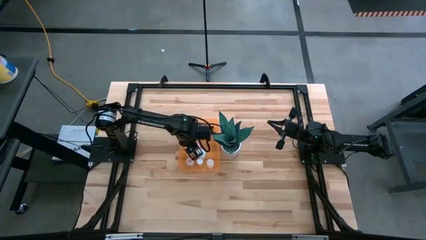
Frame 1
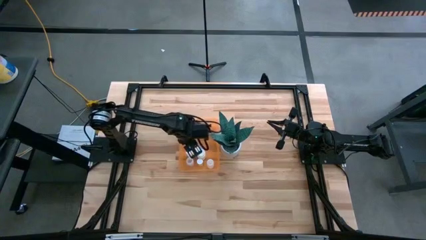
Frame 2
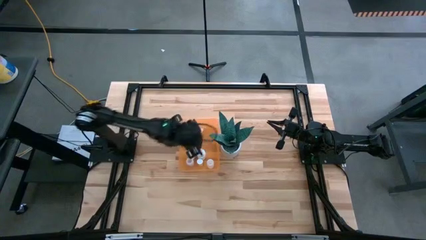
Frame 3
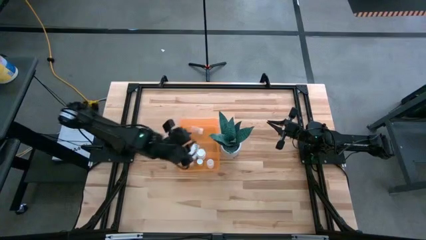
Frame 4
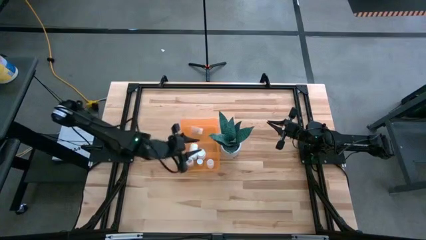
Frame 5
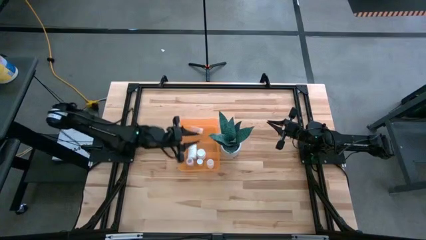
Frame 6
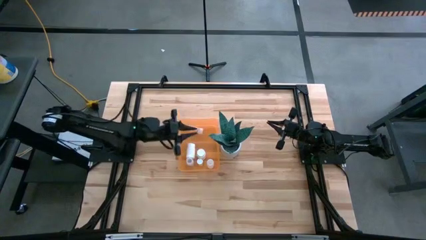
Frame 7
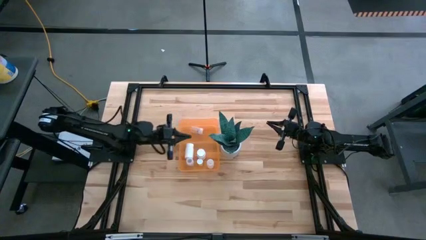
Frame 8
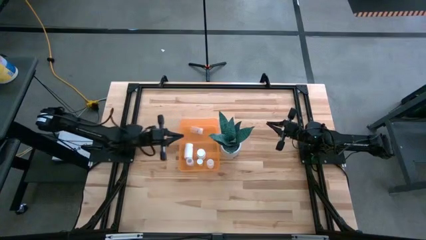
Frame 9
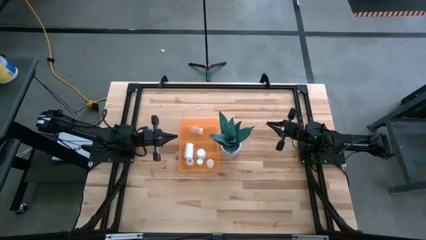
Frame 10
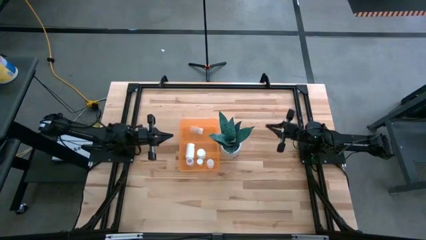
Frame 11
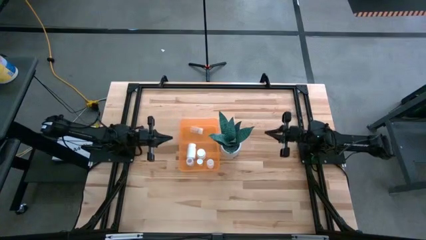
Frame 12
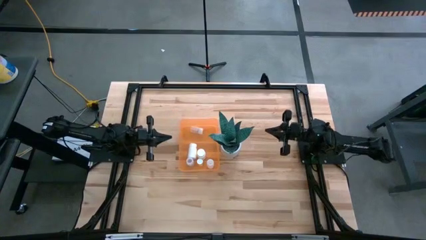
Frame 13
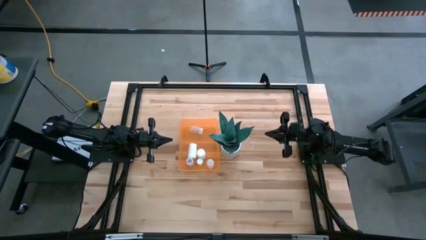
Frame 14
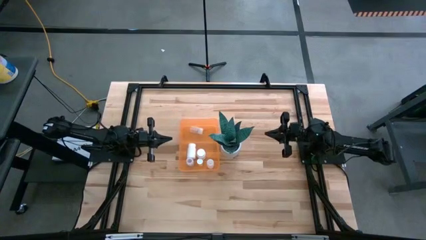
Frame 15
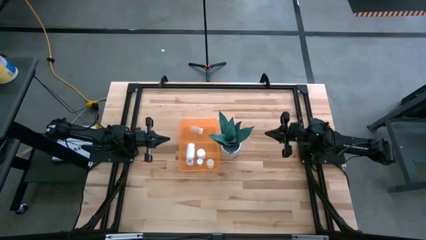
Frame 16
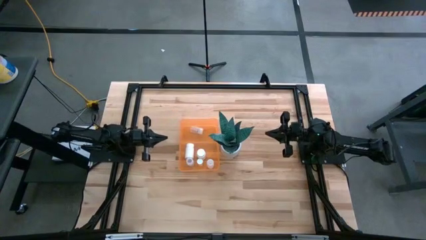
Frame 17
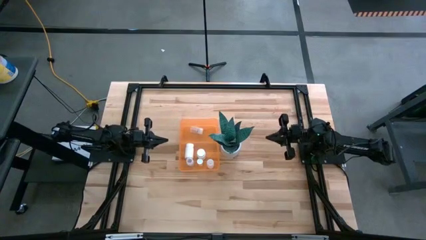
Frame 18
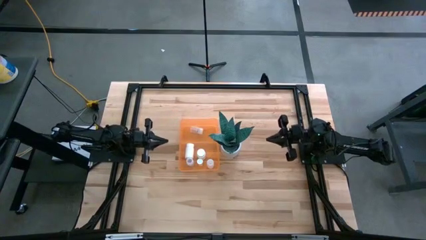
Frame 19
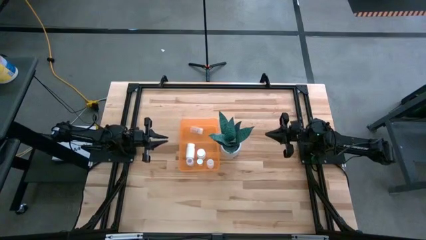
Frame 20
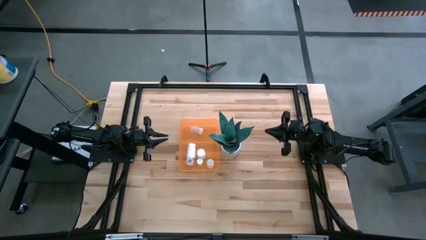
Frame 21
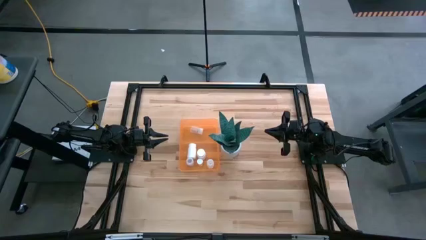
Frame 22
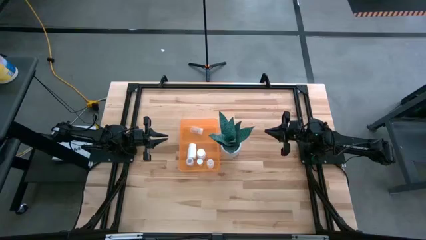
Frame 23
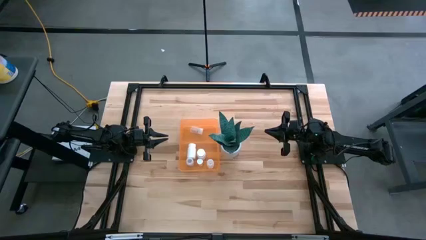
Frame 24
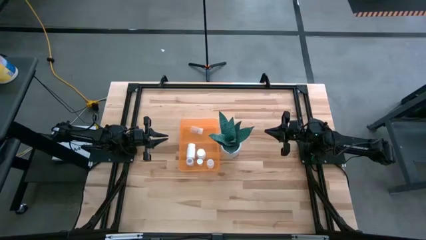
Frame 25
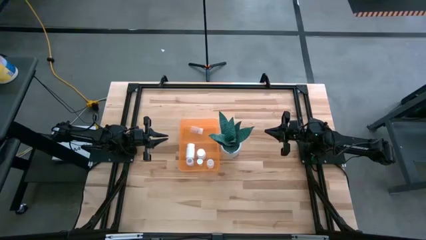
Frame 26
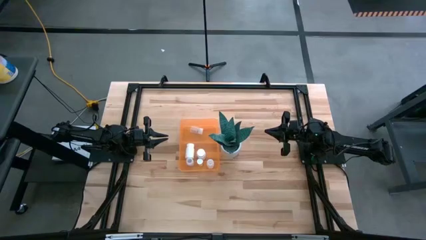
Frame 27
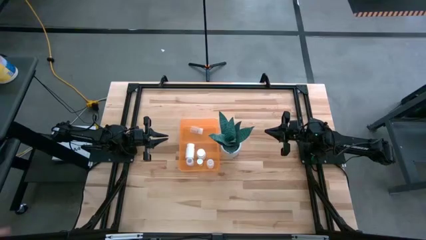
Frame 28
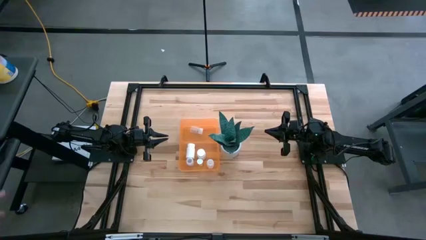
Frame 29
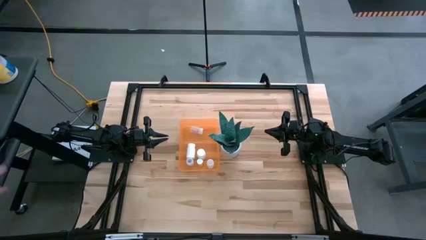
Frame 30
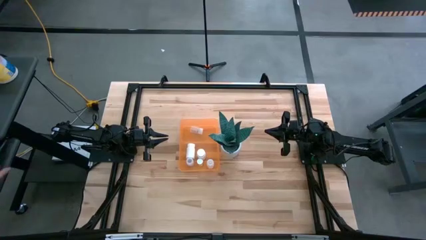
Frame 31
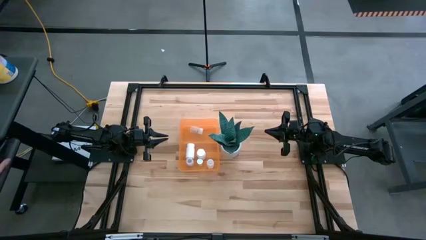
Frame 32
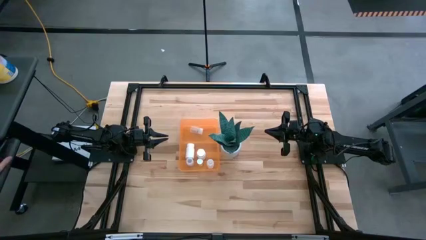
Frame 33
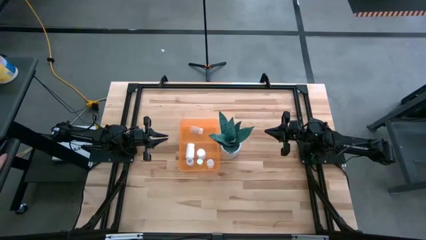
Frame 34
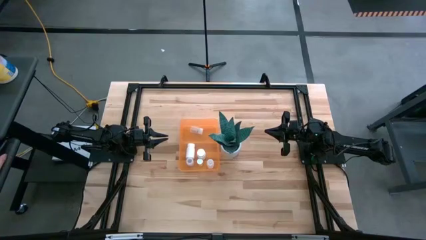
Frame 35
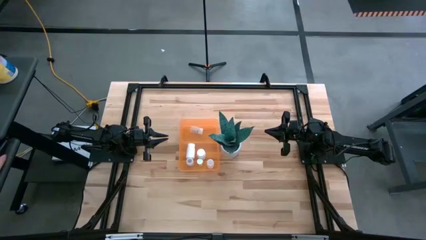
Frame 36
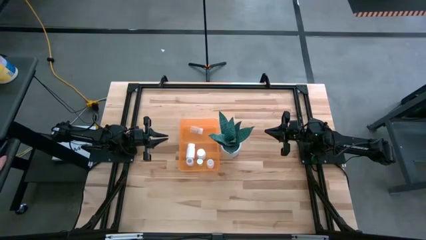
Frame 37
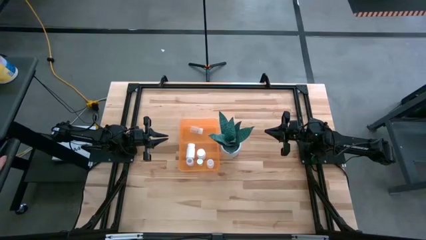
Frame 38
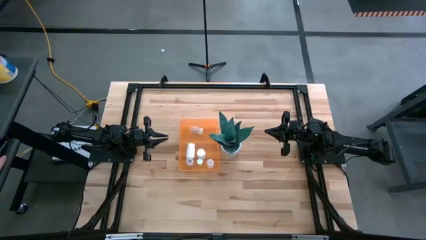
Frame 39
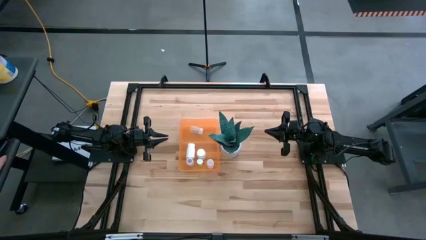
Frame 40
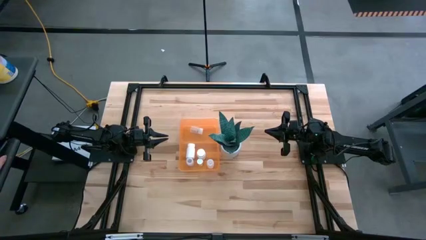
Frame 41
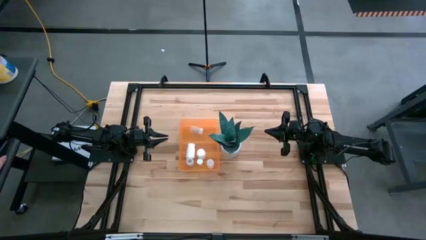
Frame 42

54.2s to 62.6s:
Task: Pick and place pill bottles into a basket
Return to Home Position

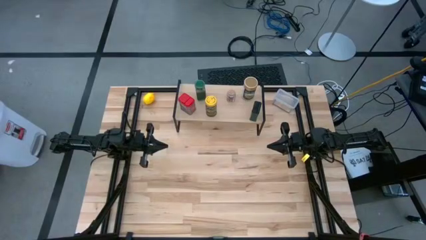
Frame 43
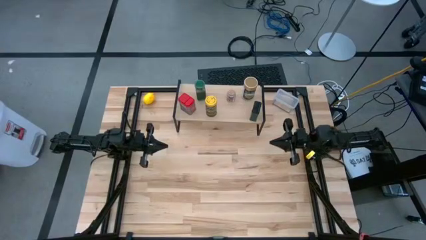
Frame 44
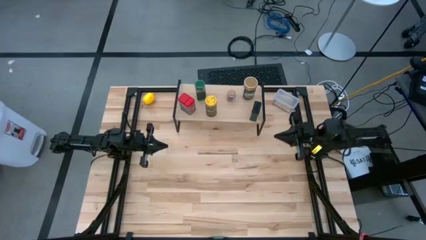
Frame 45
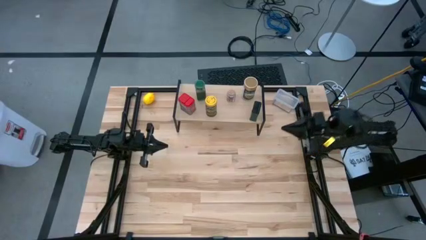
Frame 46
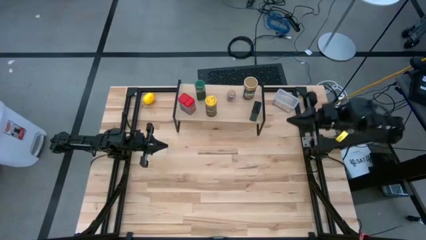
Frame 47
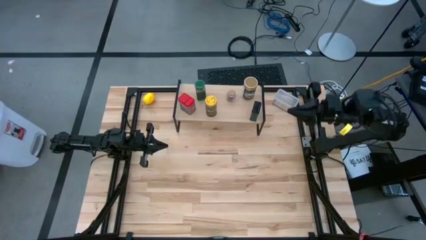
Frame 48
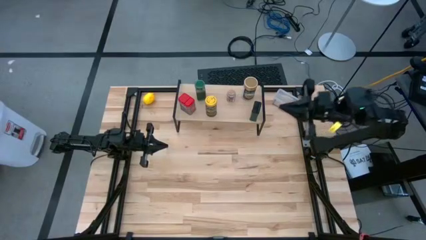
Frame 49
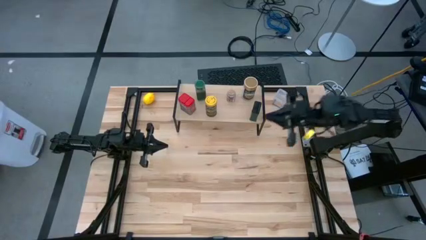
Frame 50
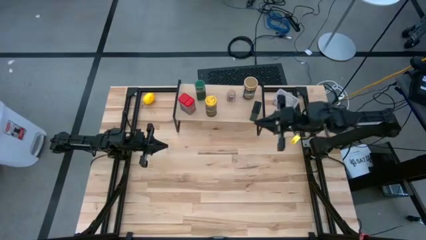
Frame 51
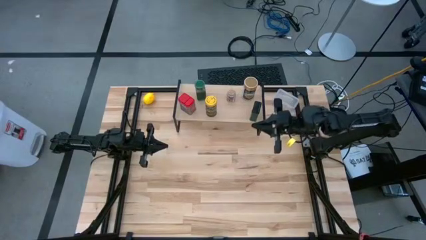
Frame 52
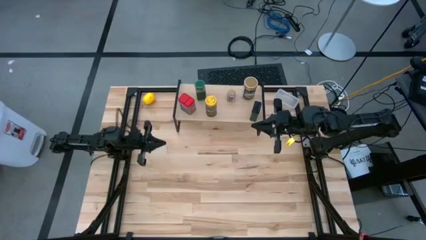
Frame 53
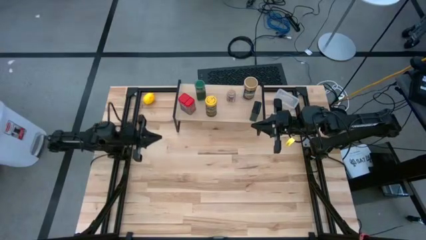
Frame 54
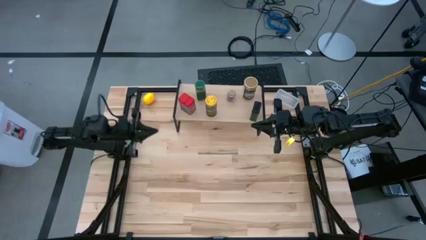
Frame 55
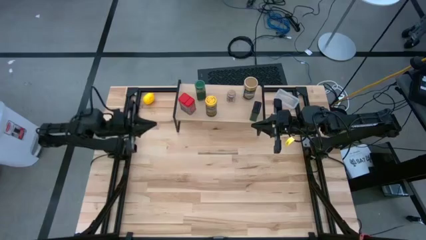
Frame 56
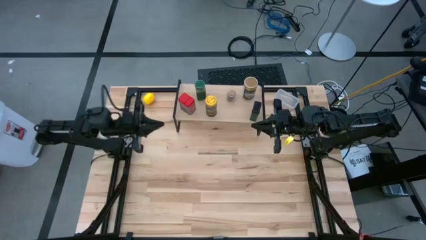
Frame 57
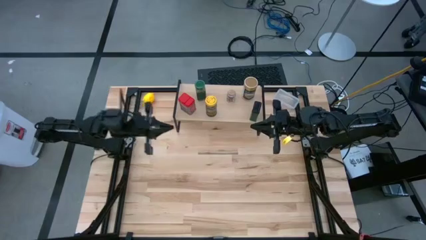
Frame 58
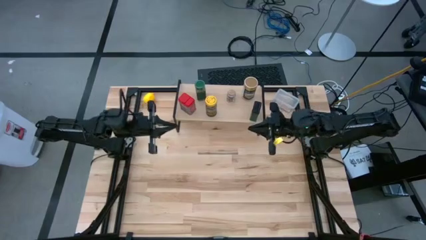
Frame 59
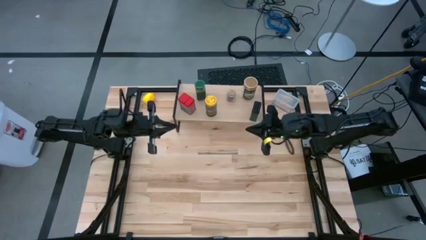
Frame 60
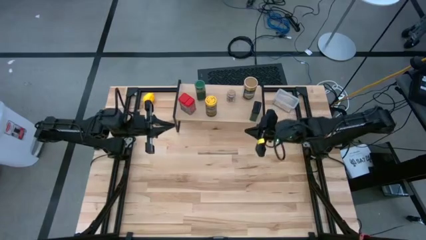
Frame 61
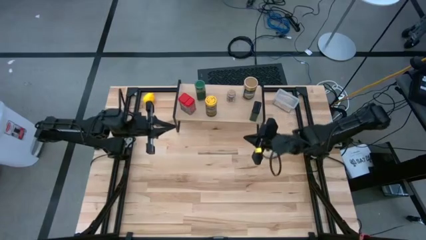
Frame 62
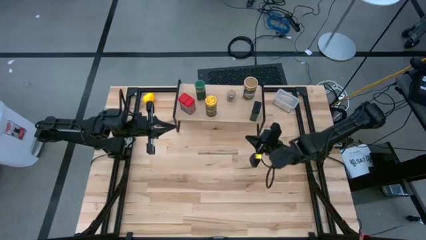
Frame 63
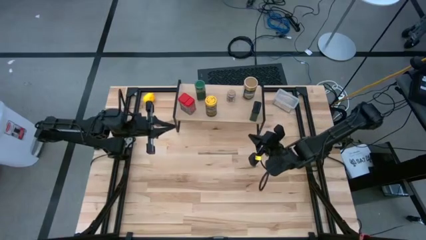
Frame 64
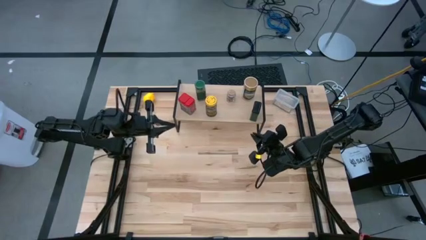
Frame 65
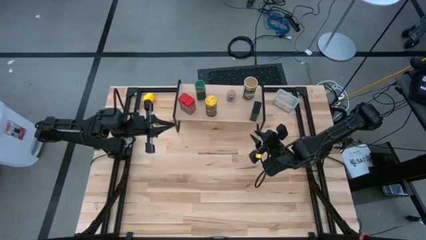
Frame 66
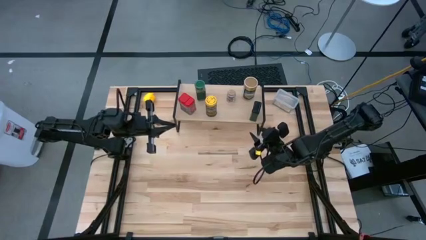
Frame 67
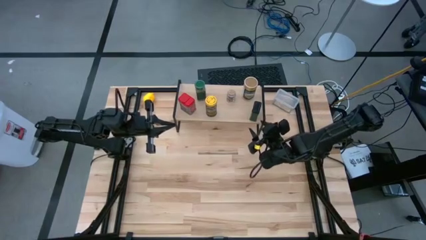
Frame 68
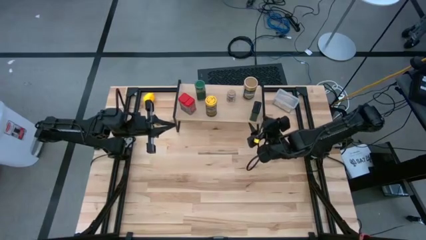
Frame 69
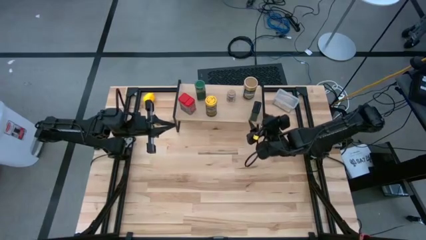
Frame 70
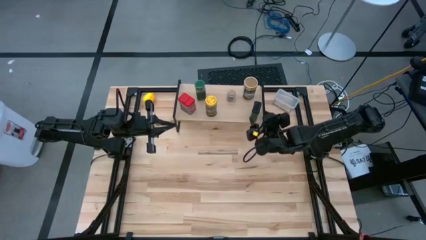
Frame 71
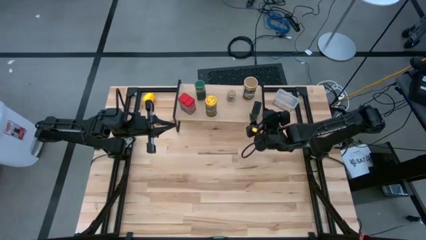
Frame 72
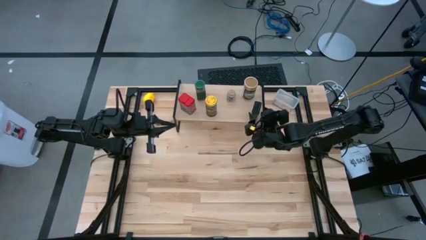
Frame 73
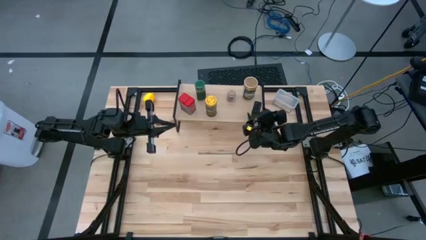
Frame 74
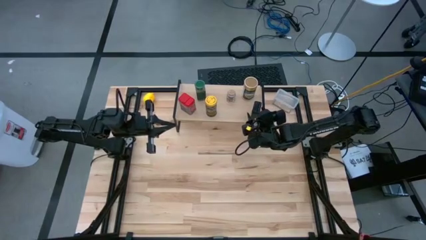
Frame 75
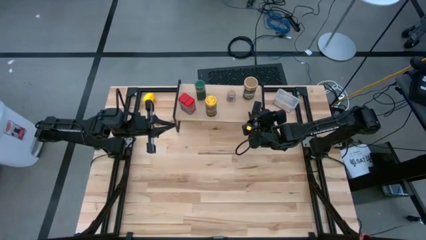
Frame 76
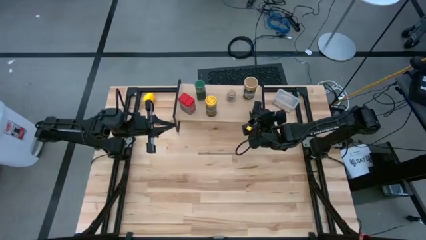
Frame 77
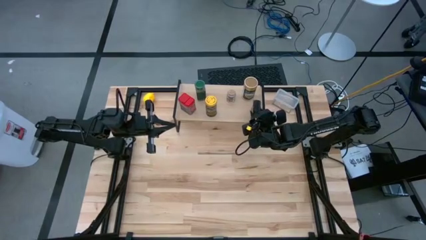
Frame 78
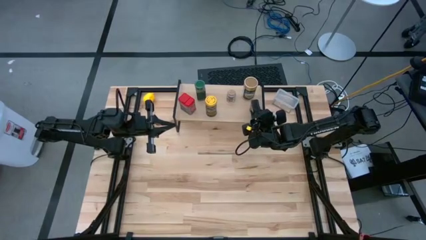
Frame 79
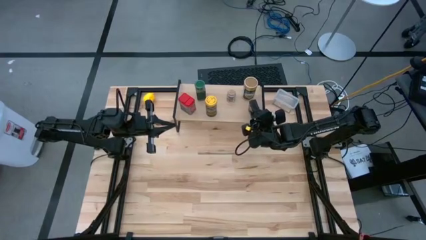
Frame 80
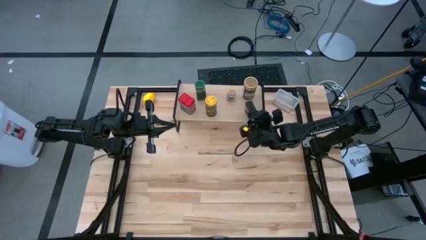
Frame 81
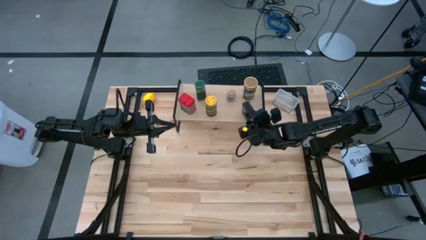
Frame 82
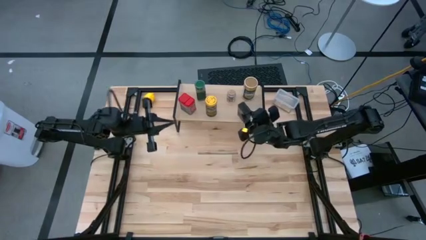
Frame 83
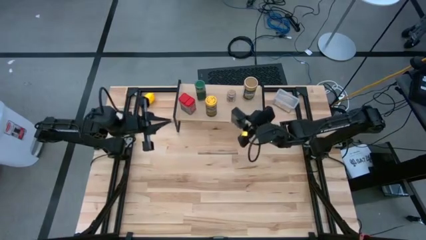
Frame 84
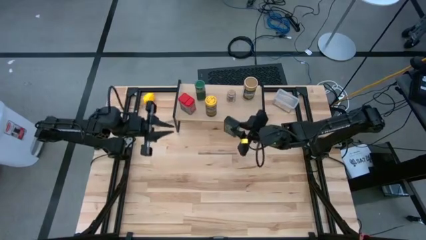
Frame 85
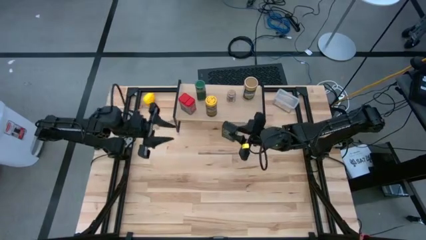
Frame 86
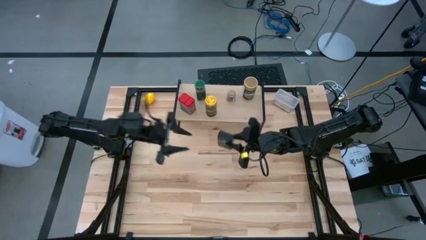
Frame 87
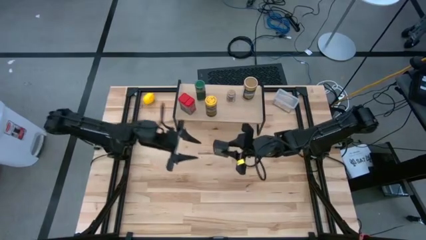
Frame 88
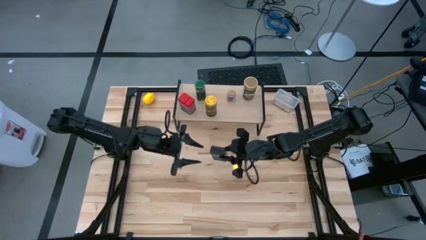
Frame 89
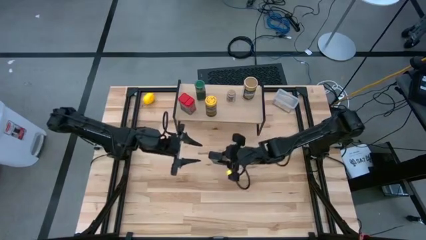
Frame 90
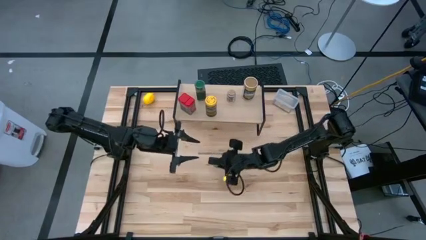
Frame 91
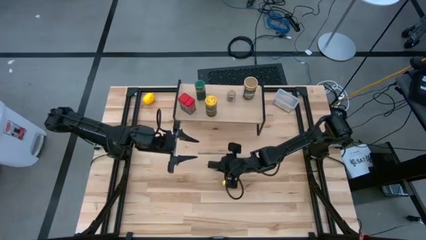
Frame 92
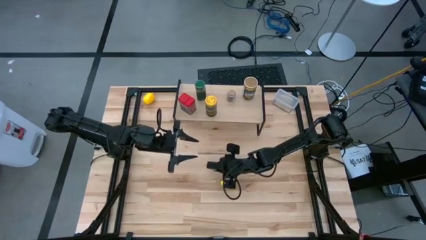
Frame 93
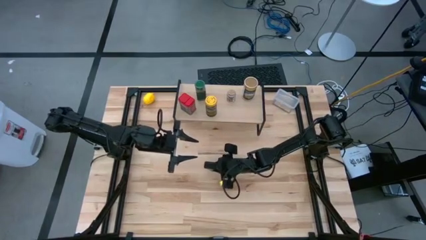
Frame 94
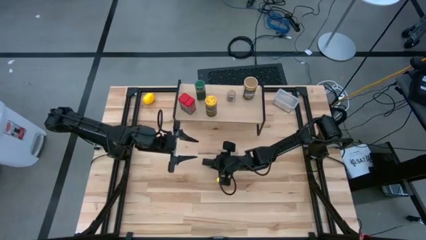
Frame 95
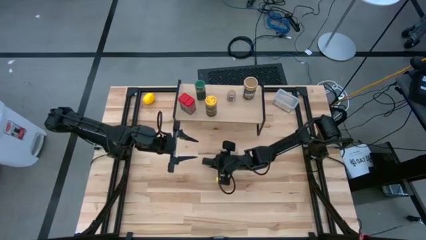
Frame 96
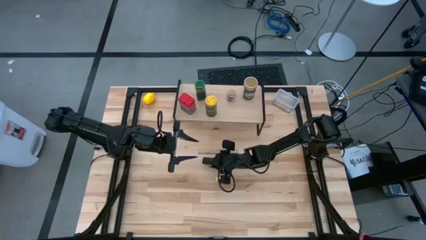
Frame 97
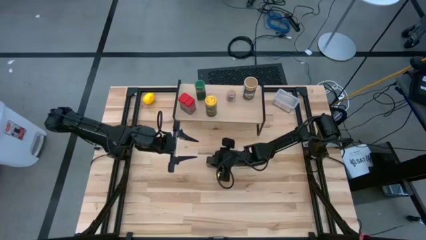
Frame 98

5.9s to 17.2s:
Task: Shelf spices
Remove the black seasoning can from the shelf
